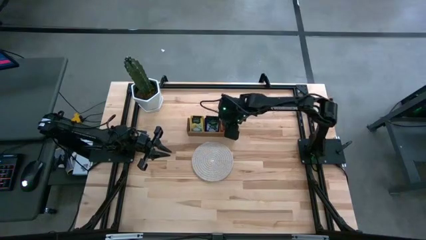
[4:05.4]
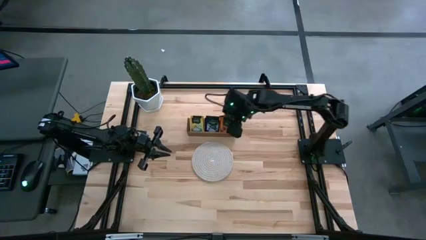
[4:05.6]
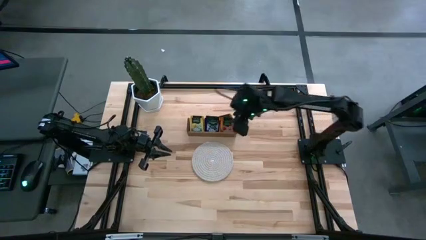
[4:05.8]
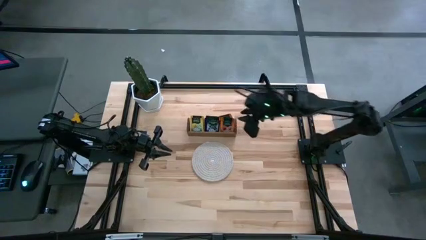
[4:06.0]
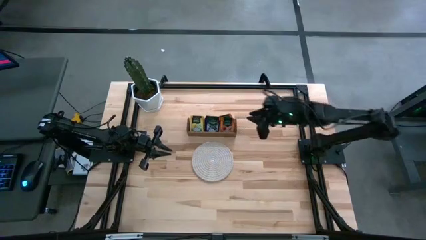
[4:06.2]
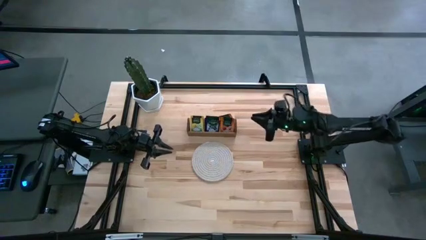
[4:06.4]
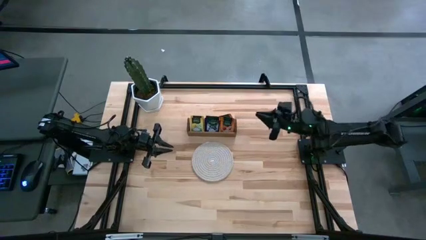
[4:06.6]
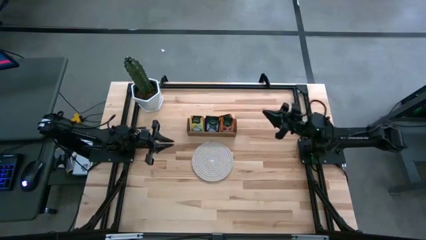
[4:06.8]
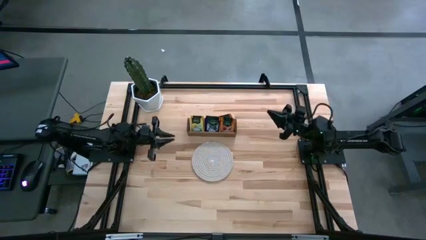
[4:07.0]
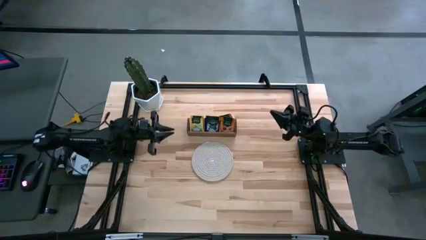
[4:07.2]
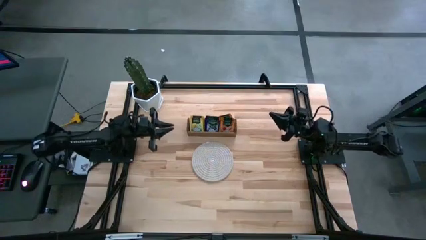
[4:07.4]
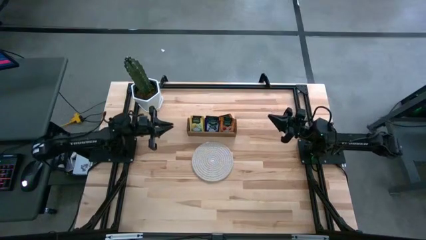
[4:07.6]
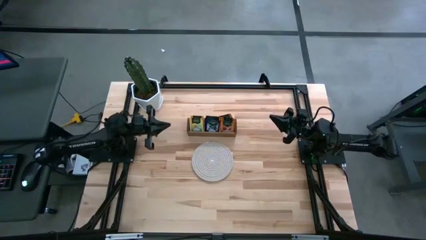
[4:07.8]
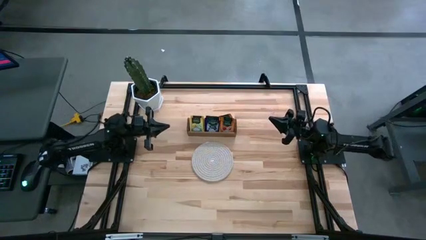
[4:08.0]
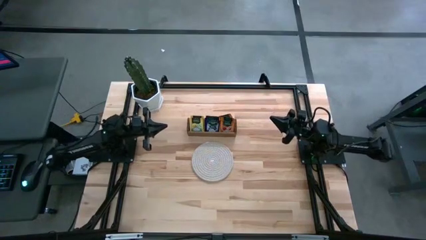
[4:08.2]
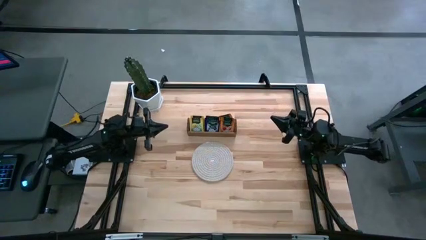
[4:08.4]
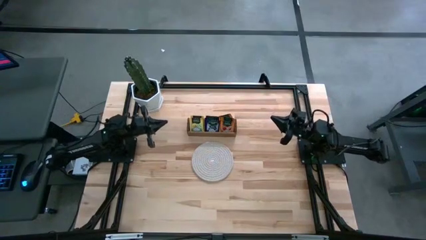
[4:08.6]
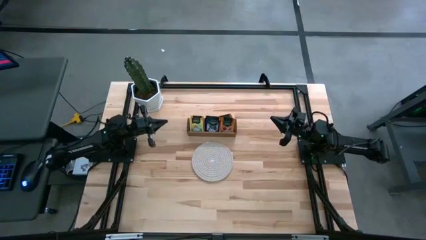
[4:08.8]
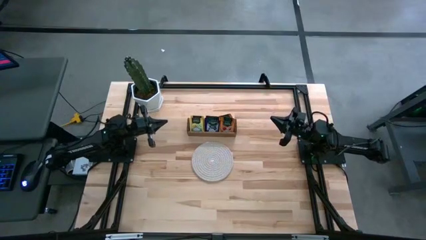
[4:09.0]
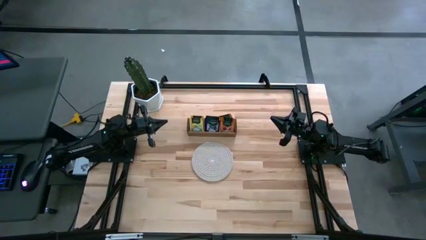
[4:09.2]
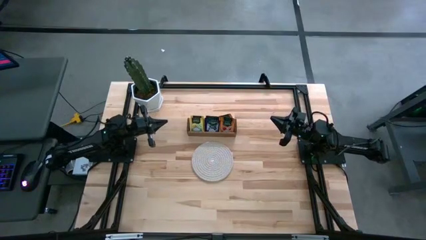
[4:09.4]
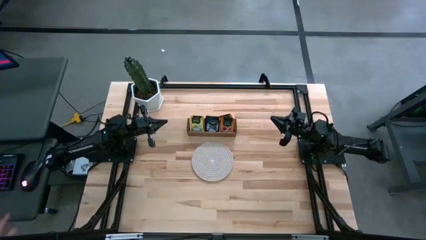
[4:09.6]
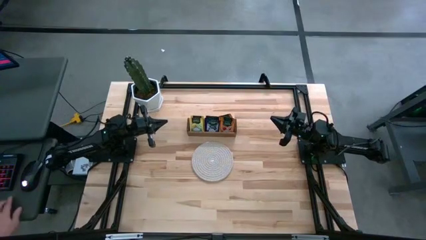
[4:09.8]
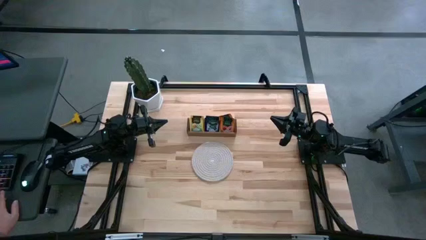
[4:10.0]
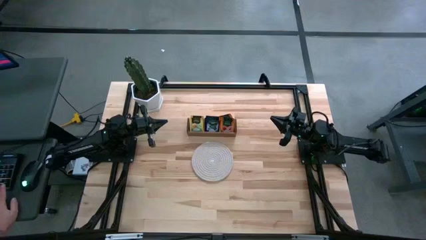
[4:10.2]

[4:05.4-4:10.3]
Task: Pick & Place Tea
Return to Home Position

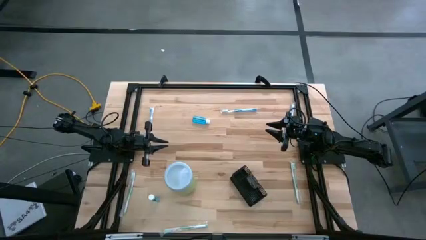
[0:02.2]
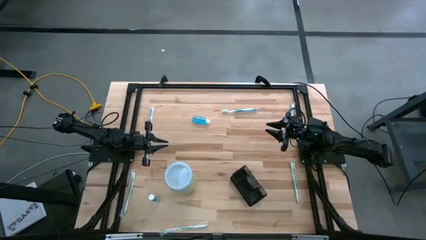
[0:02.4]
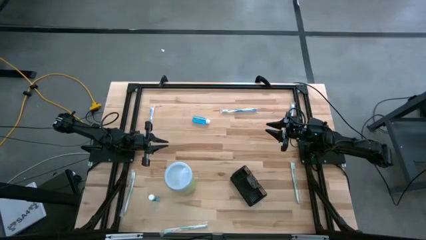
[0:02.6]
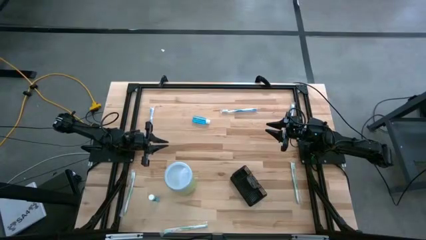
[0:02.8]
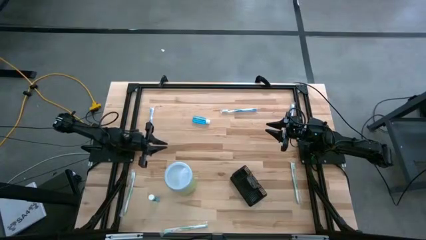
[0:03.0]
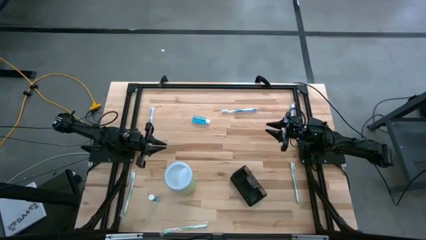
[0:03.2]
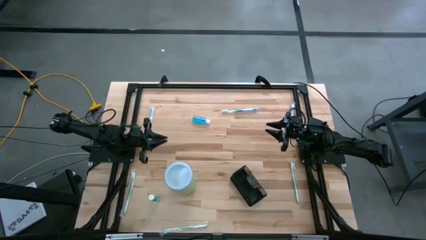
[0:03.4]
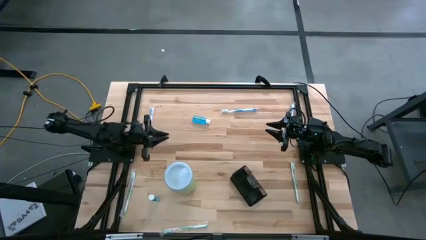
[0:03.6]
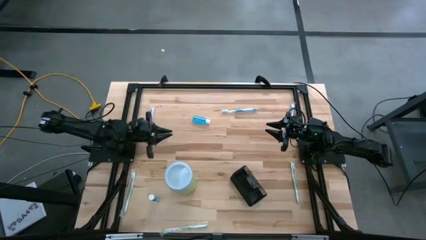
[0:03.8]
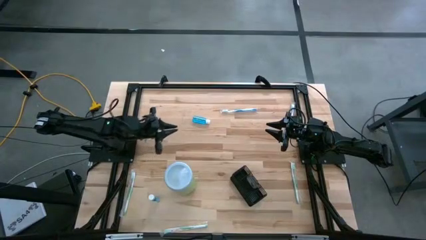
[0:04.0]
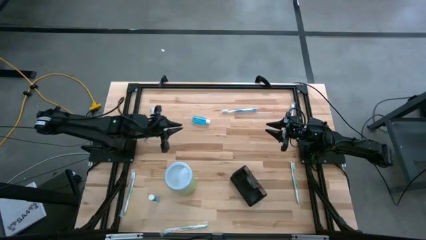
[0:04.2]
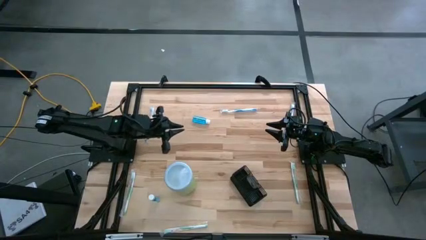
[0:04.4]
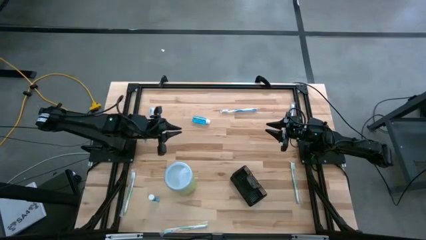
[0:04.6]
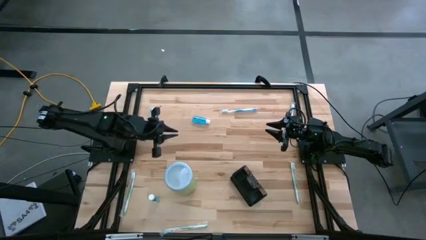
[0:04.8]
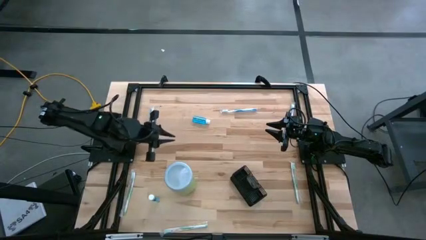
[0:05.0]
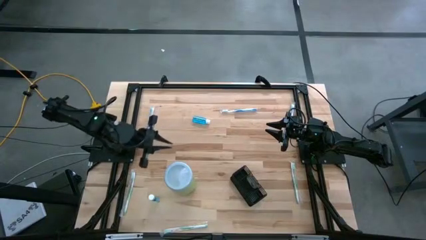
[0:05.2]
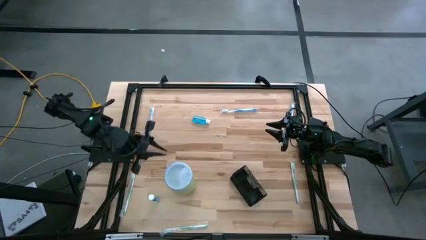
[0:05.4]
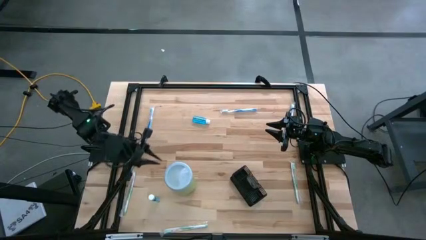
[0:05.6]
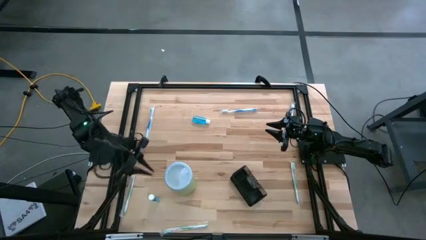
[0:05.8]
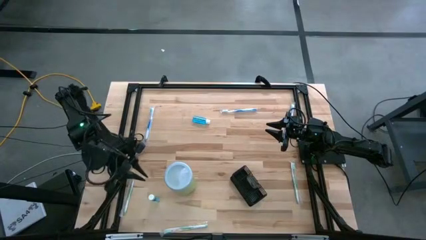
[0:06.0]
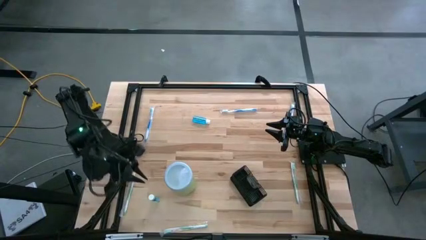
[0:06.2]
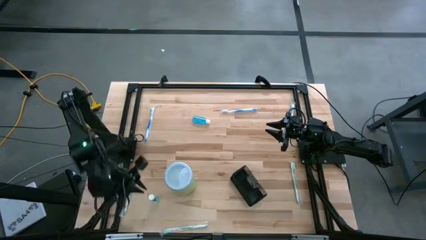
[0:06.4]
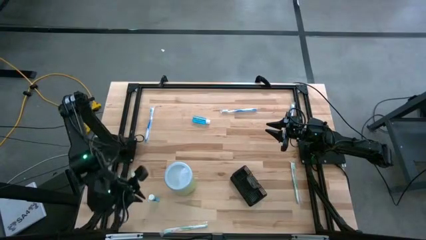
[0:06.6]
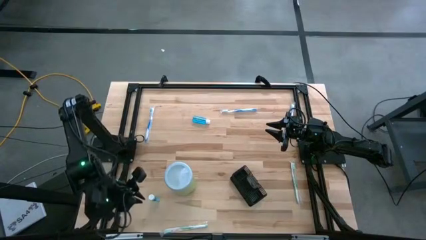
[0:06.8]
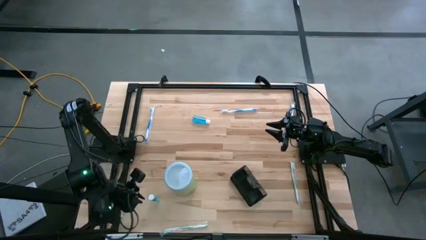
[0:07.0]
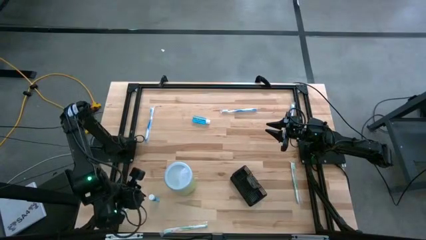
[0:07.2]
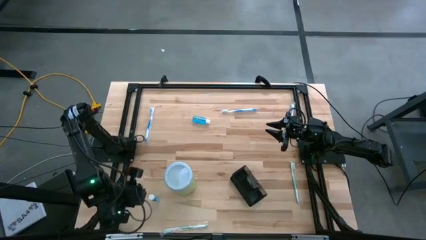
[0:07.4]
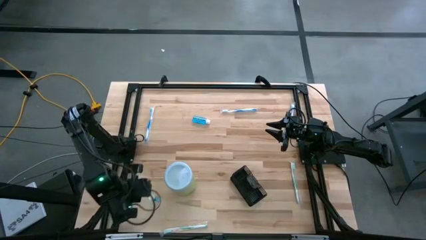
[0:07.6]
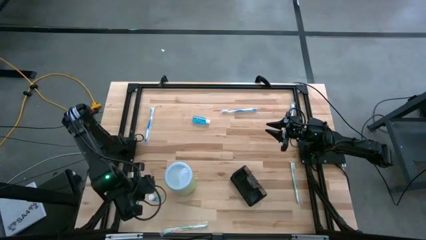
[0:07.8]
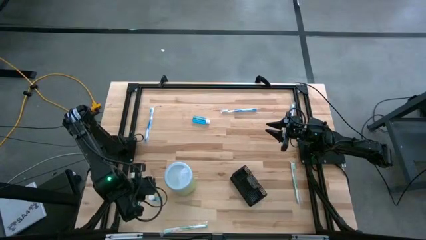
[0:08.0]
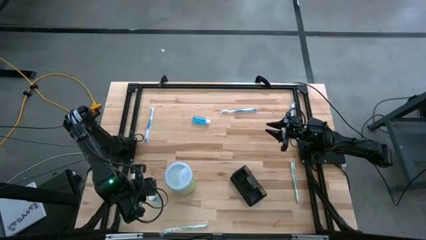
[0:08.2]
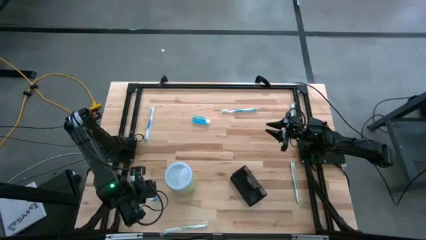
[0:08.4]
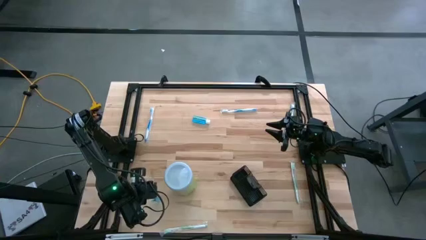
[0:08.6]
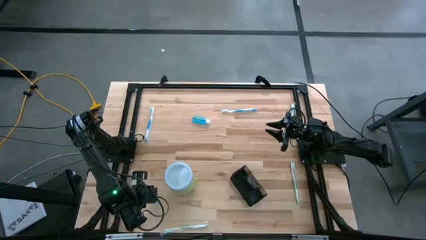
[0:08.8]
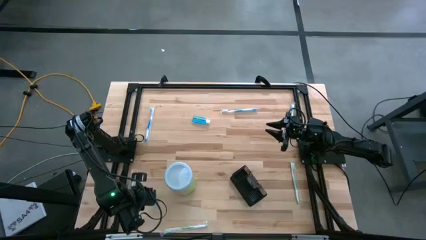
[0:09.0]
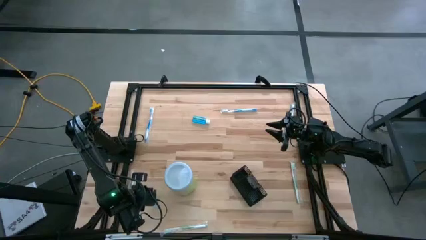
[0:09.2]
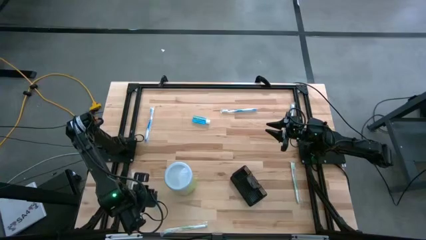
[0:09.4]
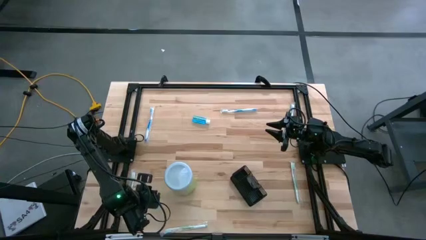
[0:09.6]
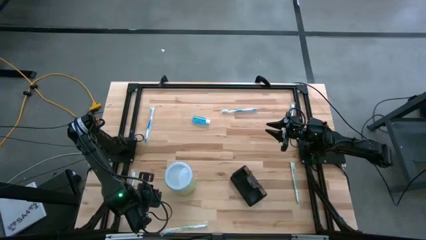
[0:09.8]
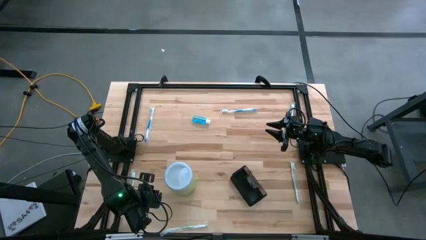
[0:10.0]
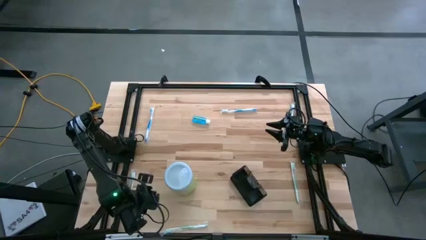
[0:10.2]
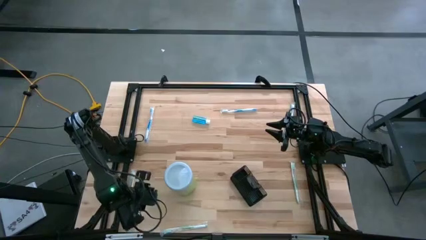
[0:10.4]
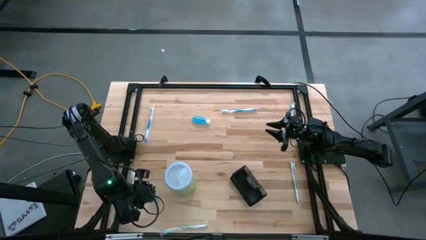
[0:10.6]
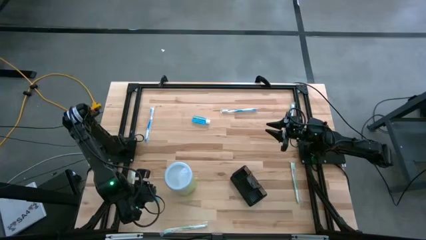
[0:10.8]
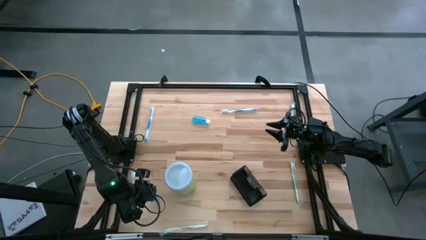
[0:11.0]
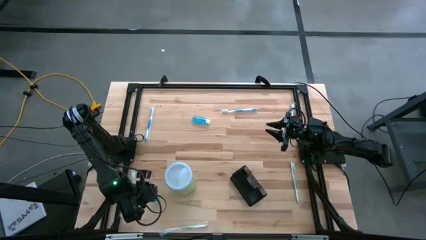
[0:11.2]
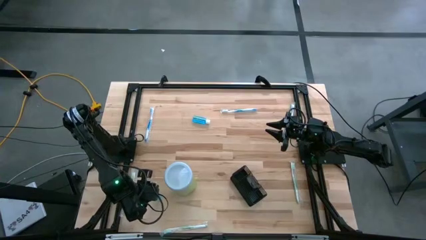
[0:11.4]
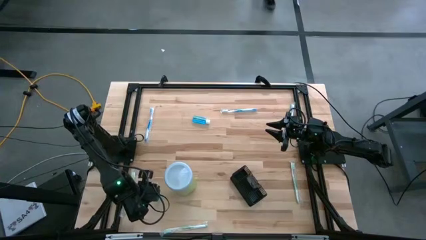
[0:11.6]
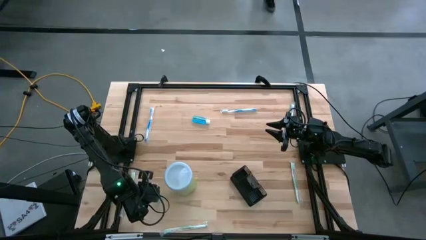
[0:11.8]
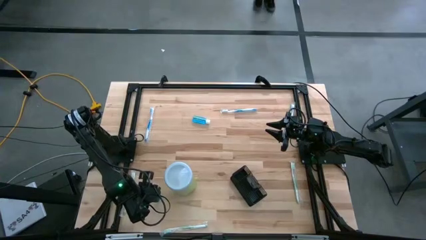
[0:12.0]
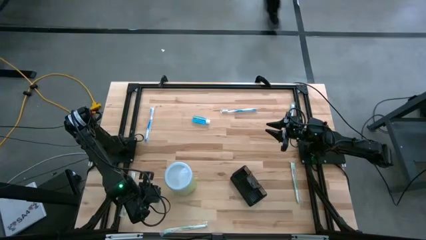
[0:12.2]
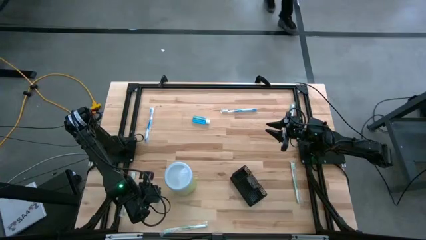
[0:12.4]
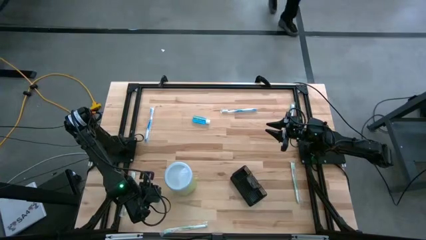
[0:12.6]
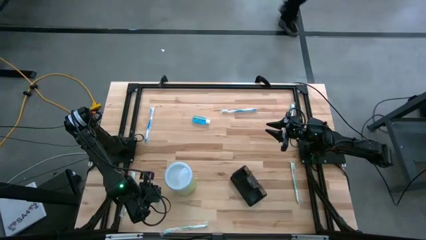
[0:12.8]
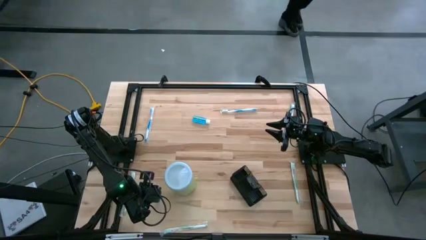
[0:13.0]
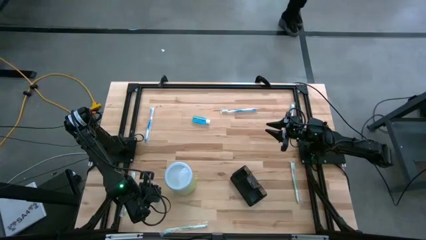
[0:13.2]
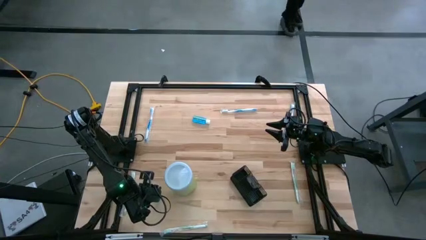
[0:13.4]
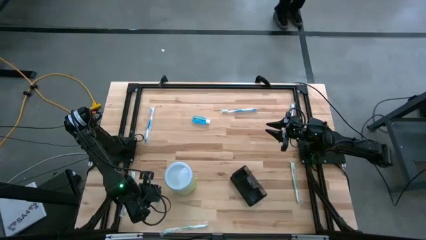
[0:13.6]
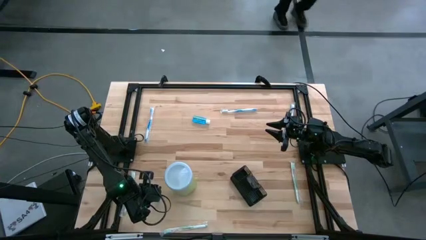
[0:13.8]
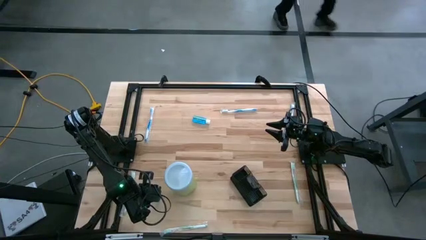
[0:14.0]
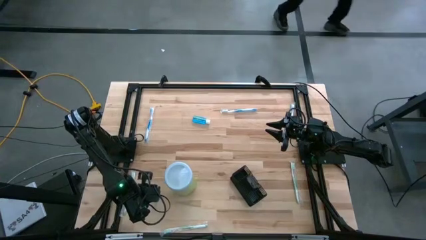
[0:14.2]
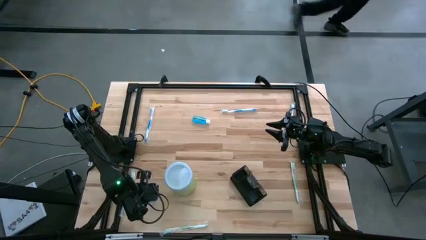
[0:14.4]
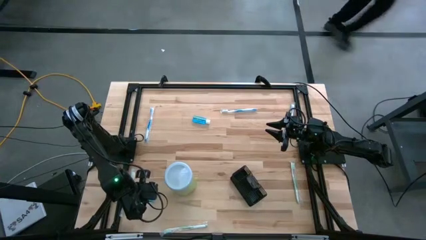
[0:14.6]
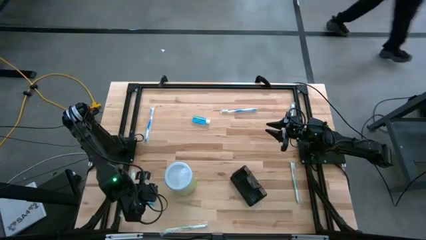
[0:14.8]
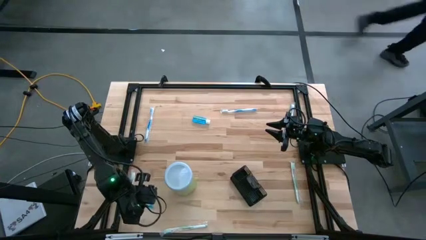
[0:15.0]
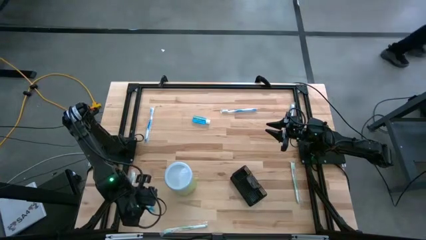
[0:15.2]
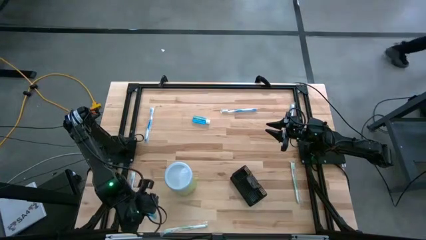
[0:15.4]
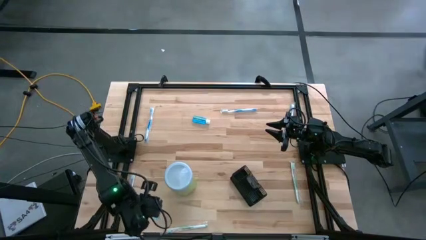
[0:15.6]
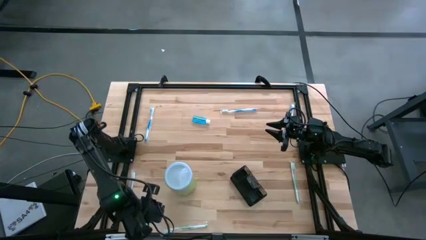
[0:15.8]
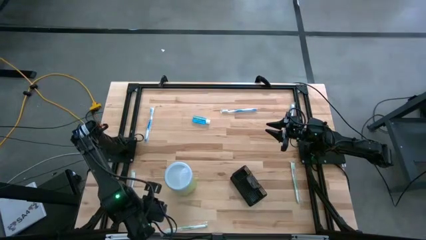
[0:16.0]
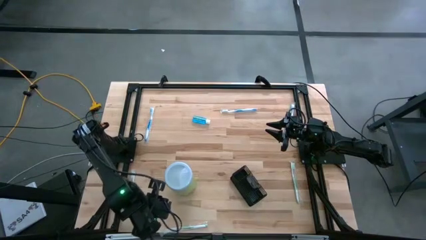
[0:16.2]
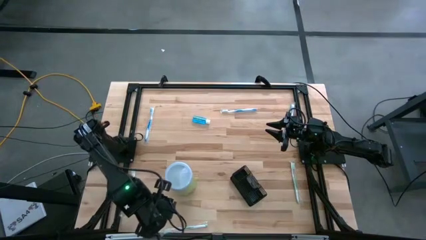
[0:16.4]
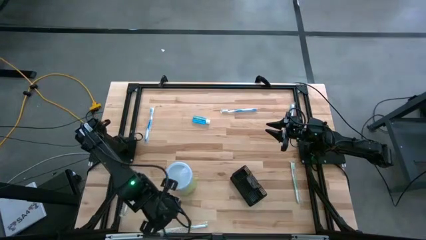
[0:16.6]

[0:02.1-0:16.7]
Task: Pick & Place toothbrushing station
Put the bottom blue mouthwash into the black mesh organizer
